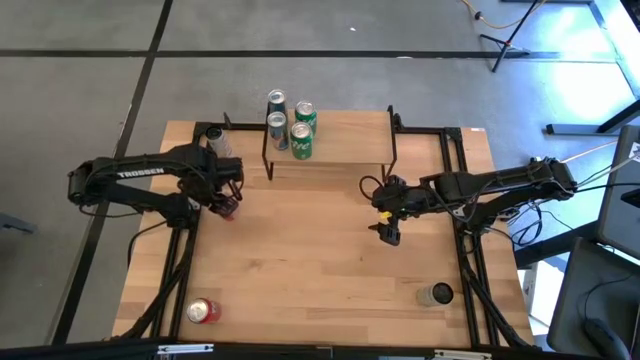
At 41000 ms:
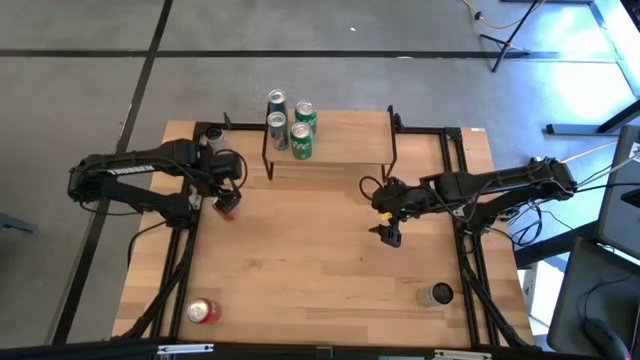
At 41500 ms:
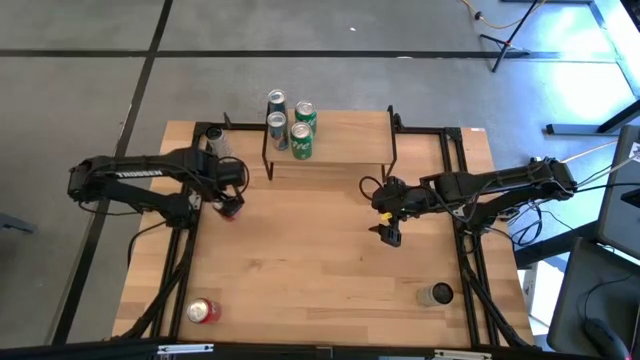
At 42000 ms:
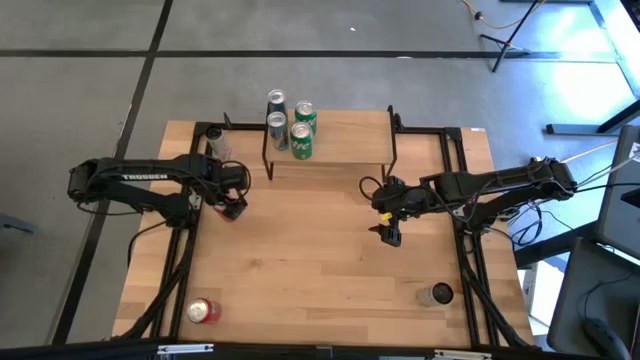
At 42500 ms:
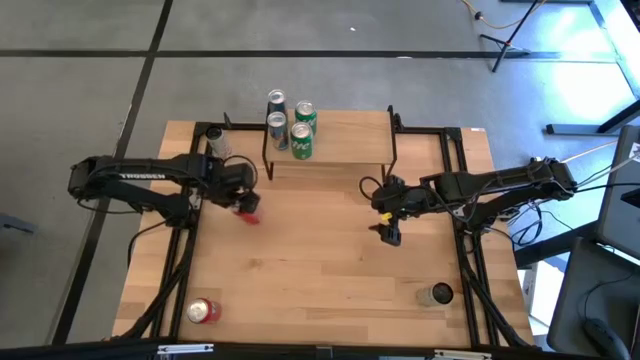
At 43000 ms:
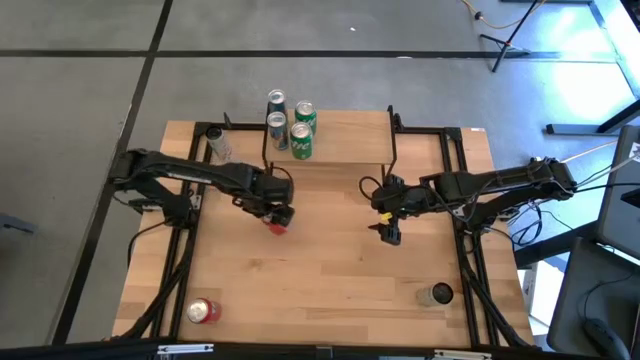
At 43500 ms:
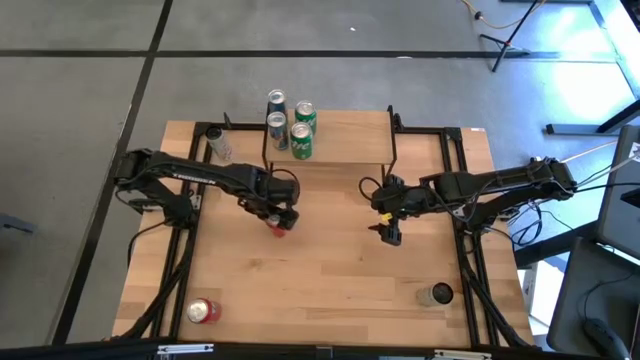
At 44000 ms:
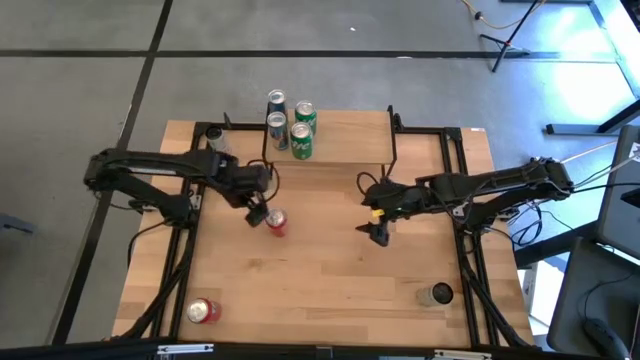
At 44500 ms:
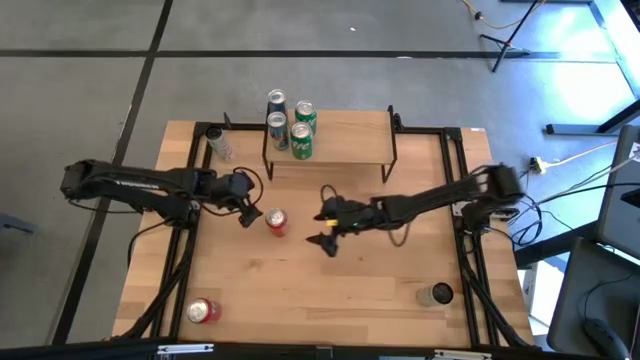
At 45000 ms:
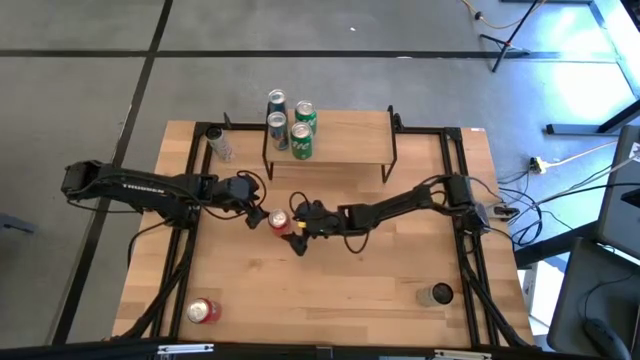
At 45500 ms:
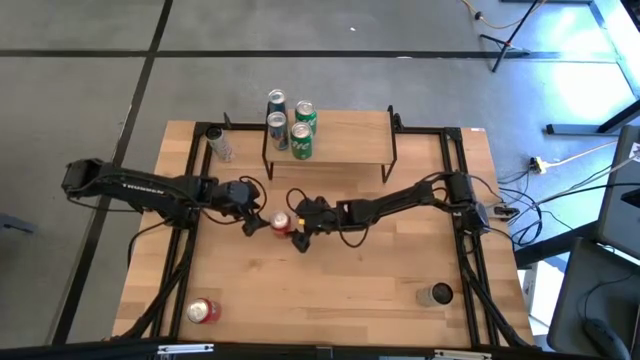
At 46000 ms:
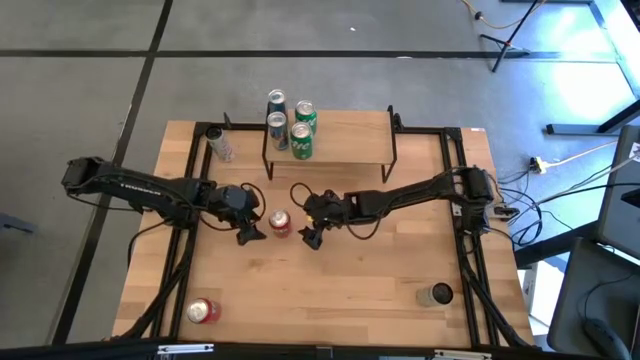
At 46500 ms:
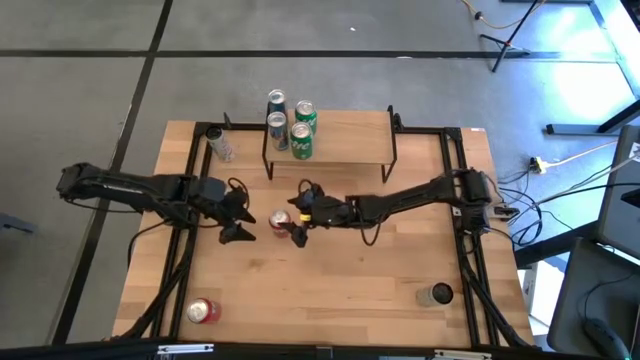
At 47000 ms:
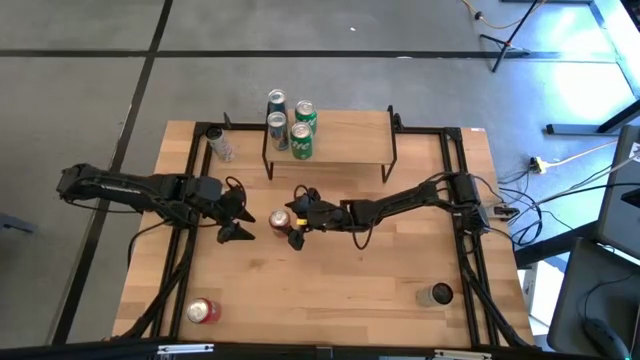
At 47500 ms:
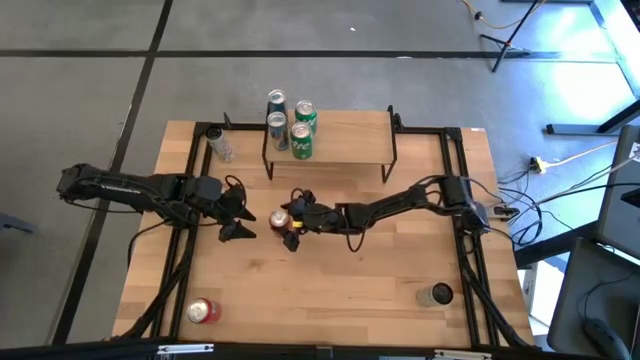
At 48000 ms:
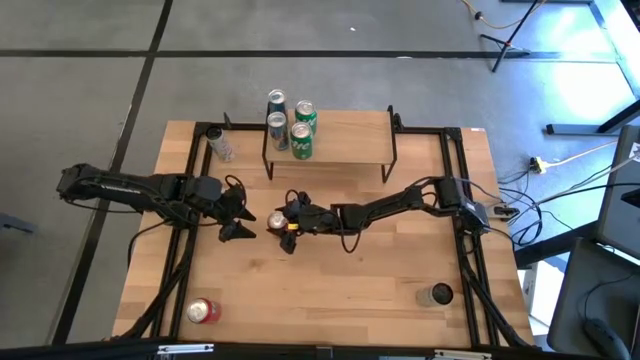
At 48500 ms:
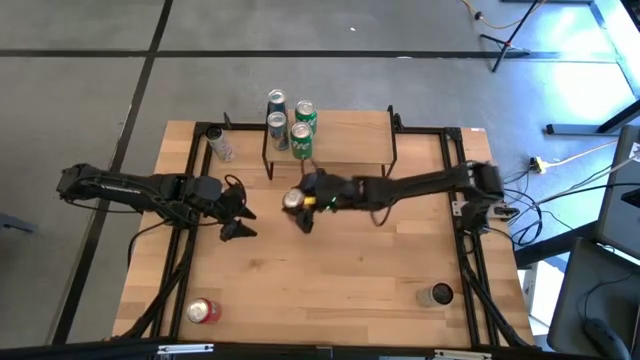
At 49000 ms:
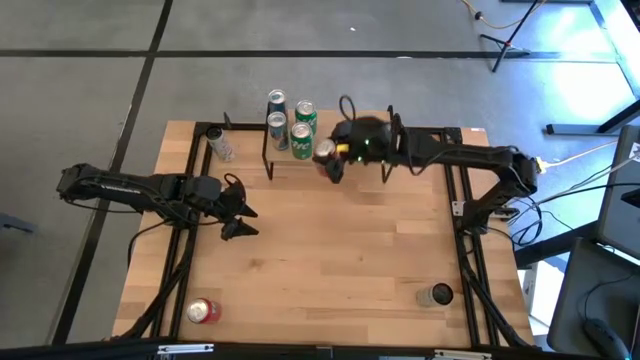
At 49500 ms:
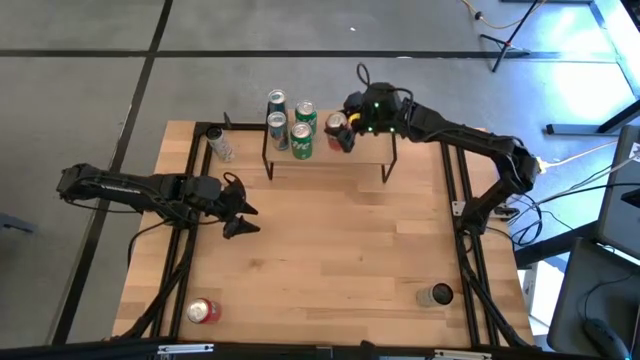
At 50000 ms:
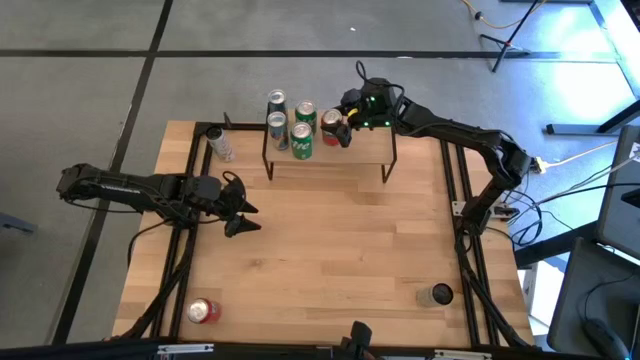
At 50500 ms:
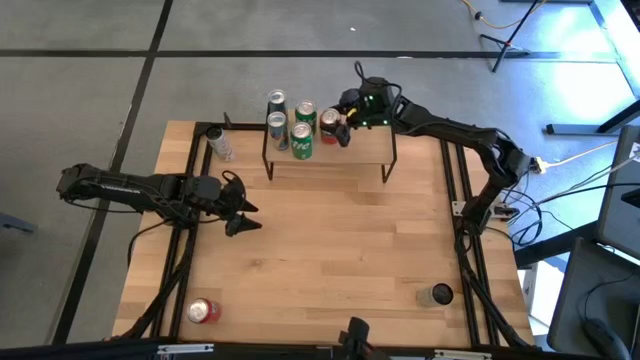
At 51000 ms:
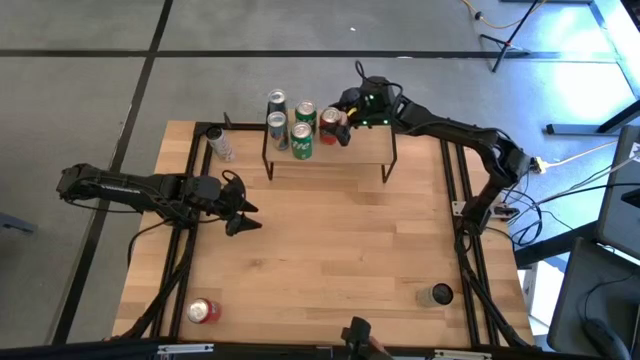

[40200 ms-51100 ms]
Task: Place canned beverage on shelf
Put the top orange soda can on the shelf

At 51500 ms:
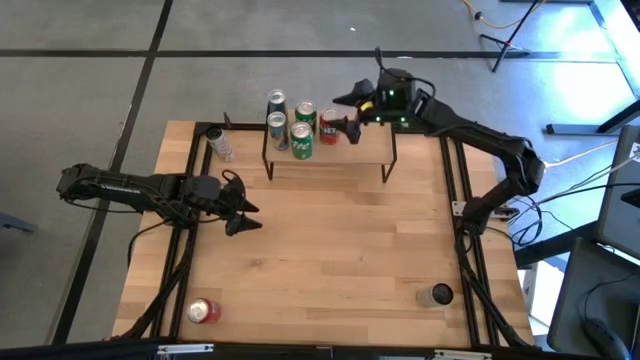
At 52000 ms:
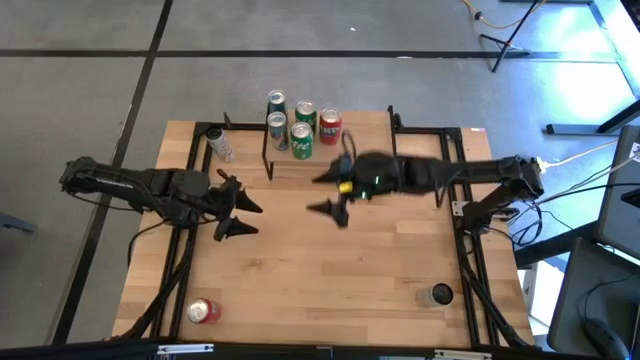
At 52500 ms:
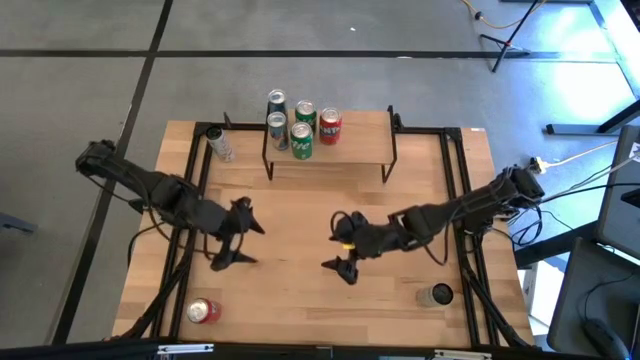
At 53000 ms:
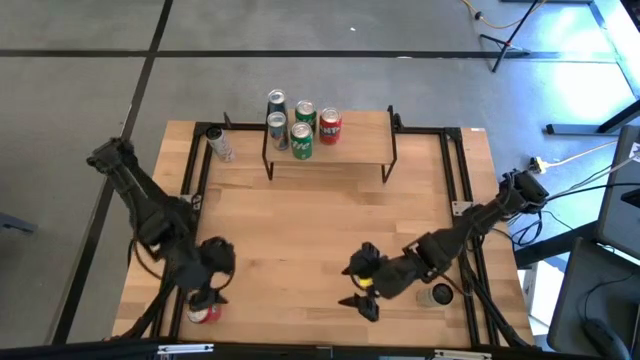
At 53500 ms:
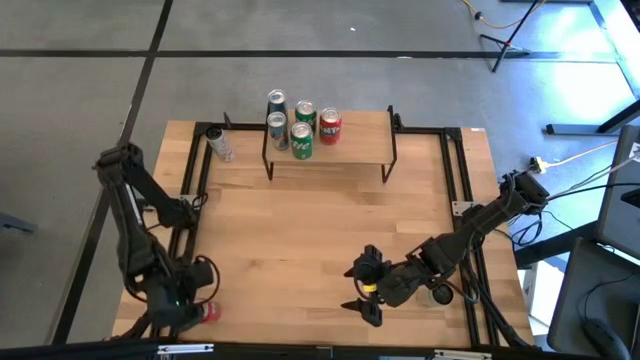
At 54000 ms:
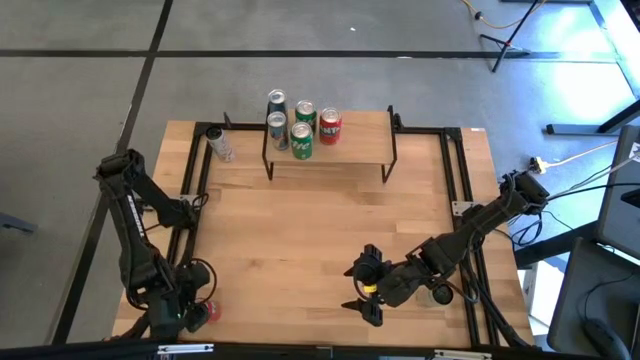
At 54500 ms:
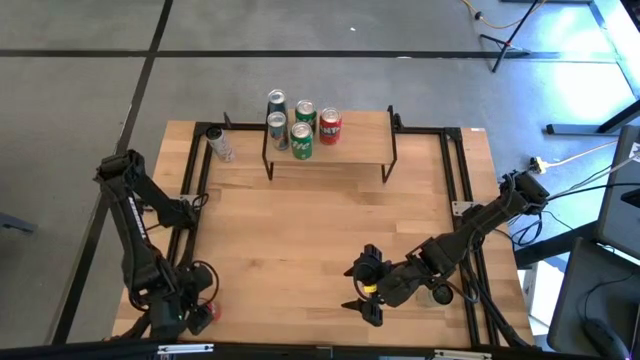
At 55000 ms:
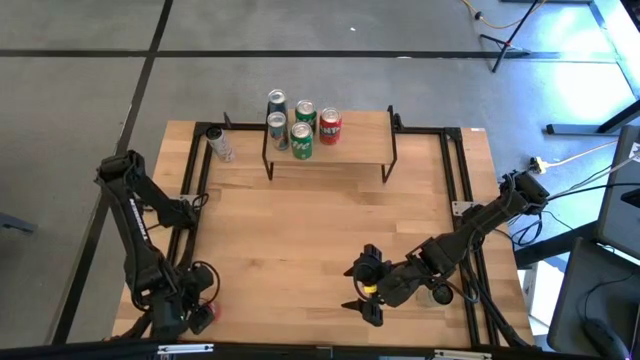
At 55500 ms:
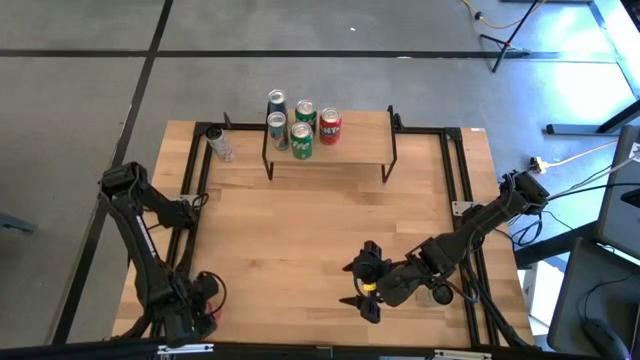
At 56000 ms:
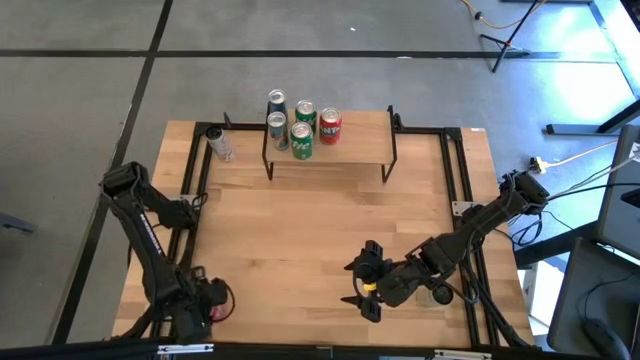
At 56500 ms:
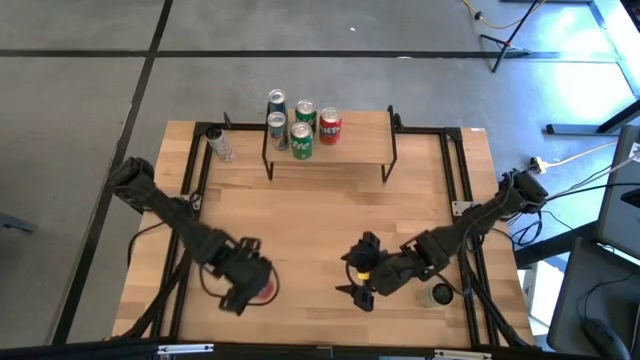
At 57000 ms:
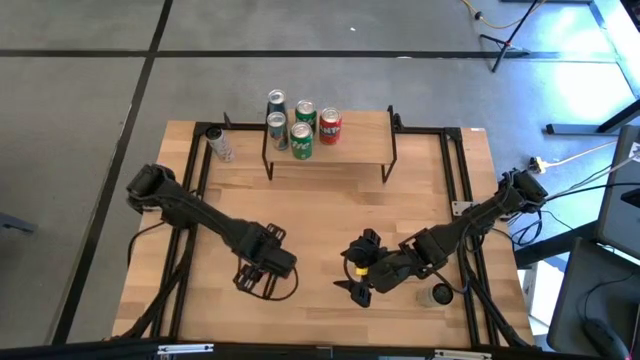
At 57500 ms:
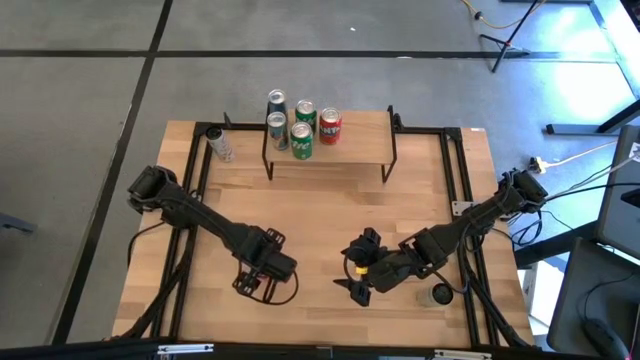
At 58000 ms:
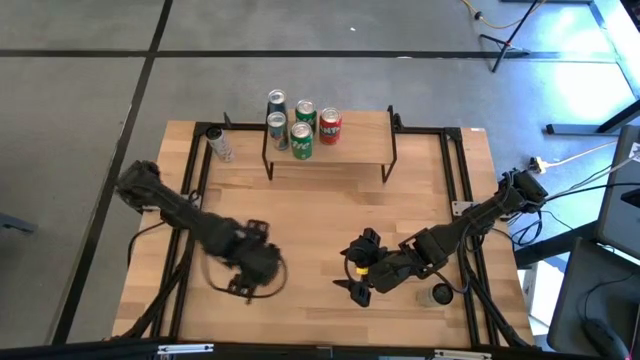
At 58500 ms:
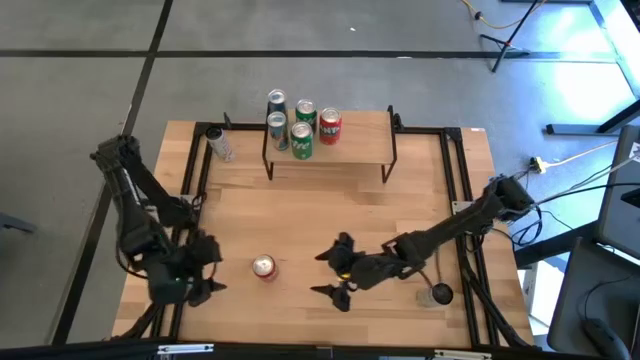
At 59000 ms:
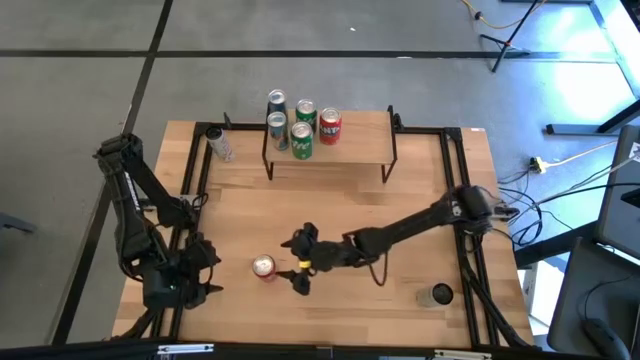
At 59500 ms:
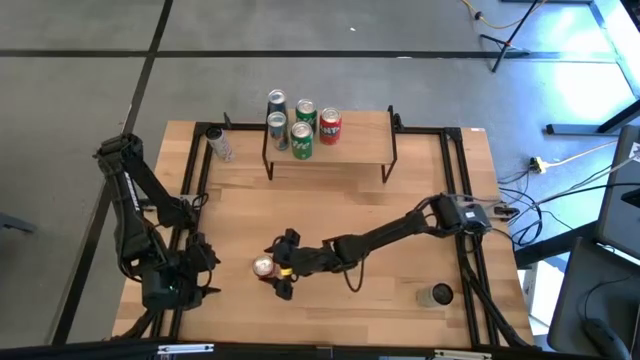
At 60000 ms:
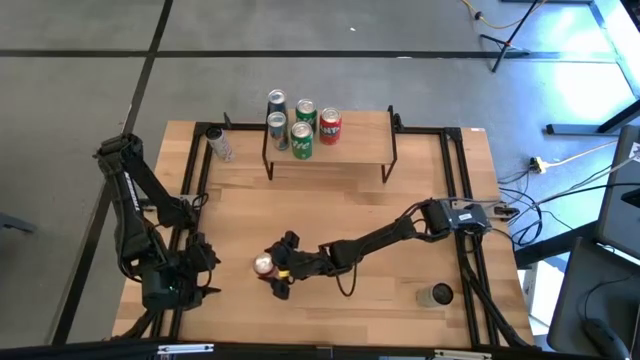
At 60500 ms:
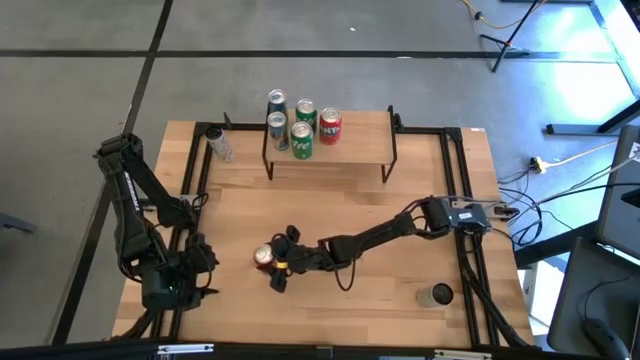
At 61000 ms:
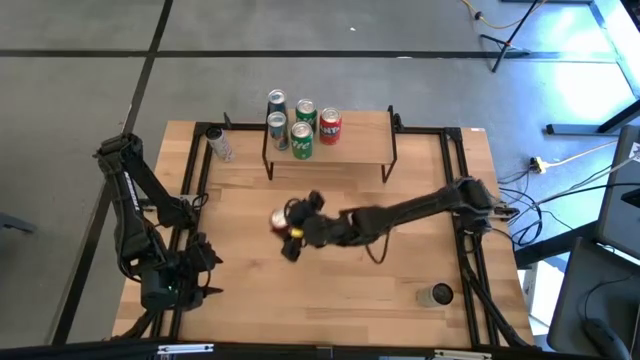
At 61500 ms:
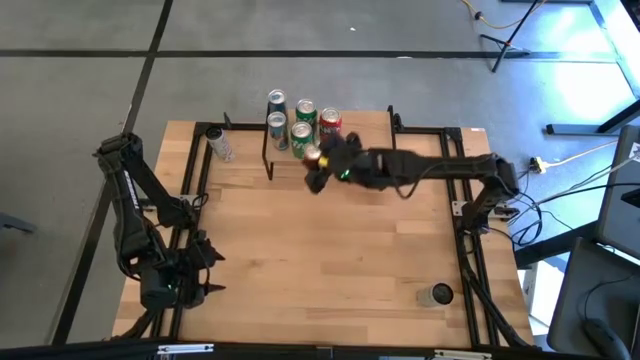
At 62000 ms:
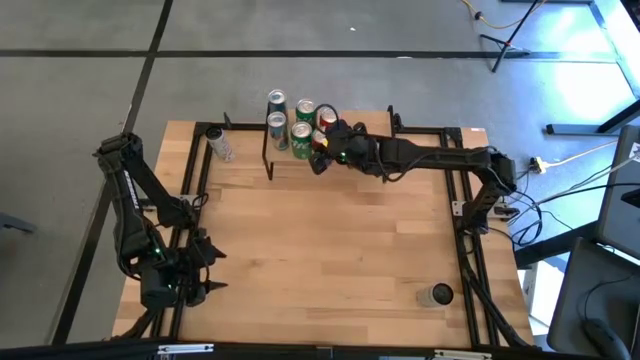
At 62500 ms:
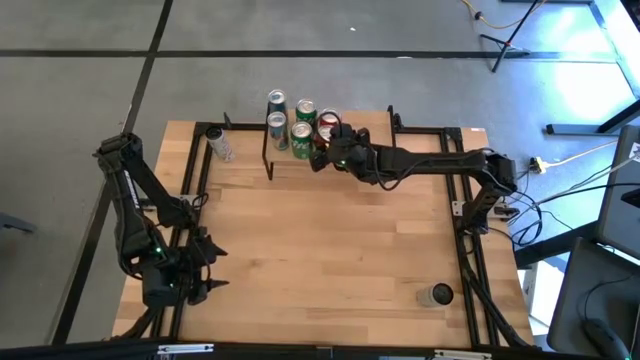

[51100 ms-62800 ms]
Put the orange soda can on the shelf aligned with the other orange soda can
